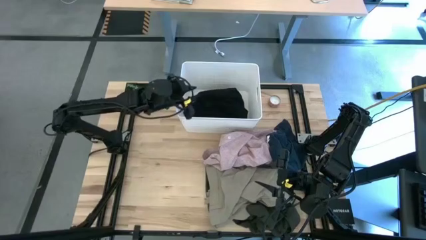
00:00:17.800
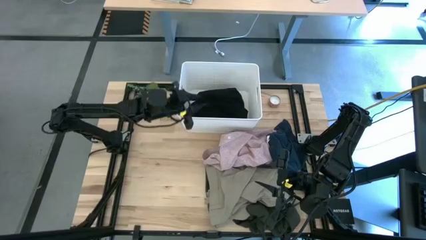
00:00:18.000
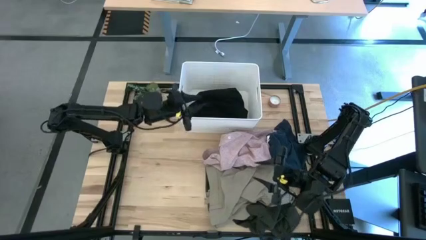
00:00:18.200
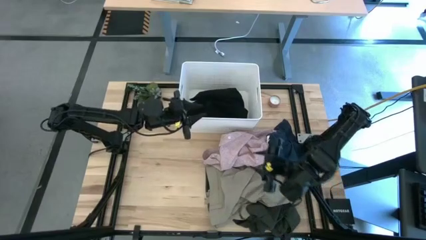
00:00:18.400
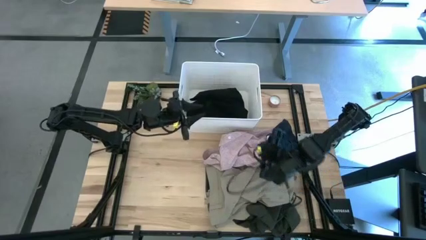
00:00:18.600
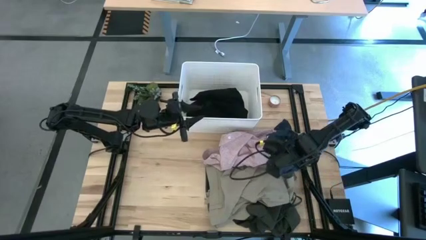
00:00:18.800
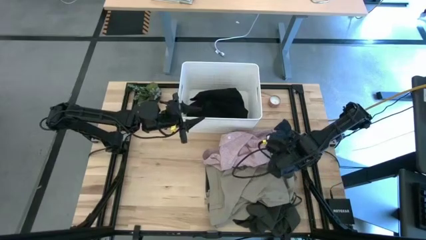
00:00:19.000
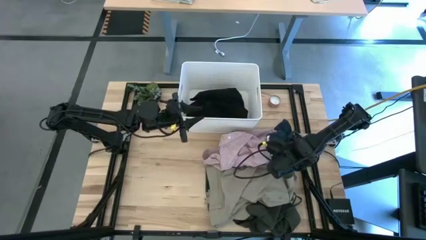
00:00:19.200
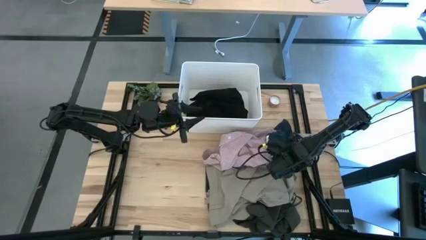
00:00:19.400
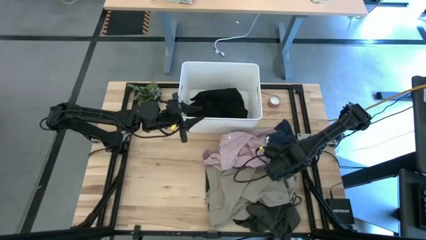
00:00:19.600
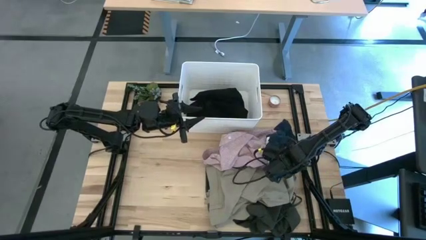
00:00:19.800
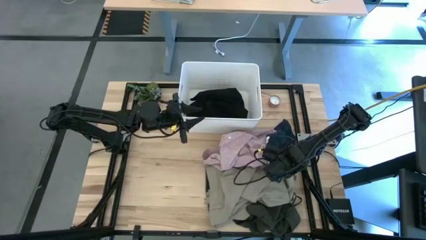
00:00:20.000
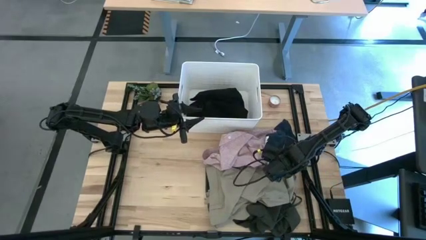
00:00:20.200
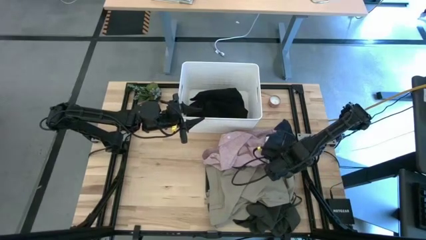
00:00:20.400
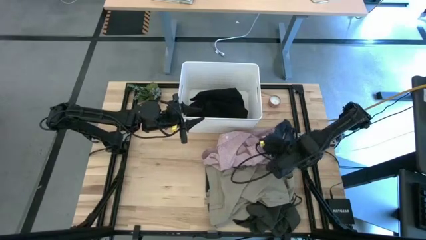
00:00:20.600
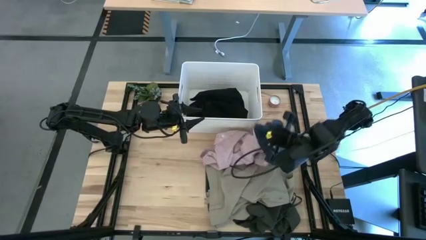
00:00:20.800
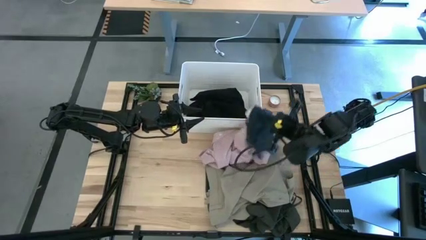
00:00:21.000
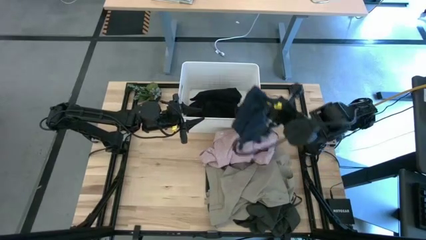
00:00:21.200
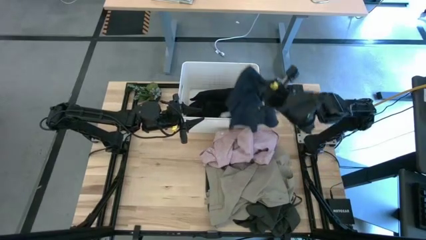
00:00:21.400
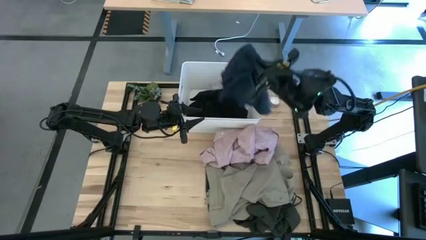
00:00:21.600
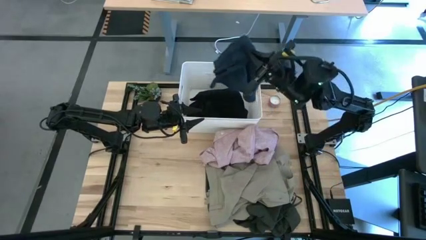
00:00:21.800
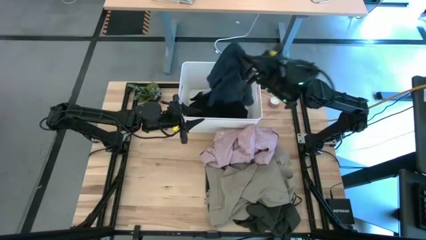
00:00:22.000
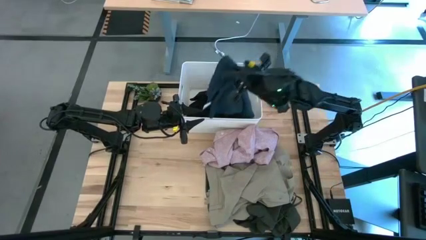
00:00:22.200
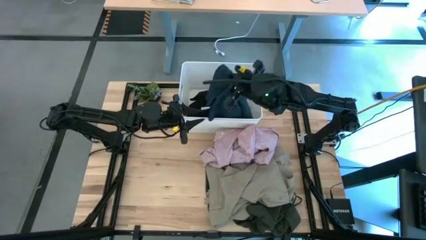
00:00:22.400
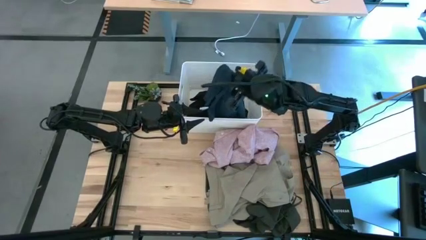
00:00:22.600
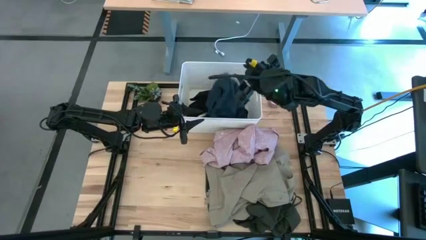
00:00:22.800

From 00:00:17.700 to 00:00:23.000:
Task: Sort clothes
Put the blue underwear in the white bin

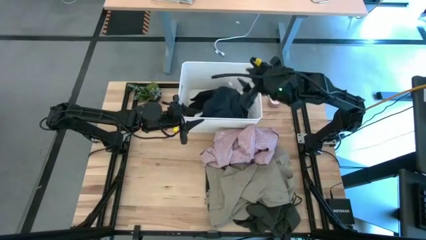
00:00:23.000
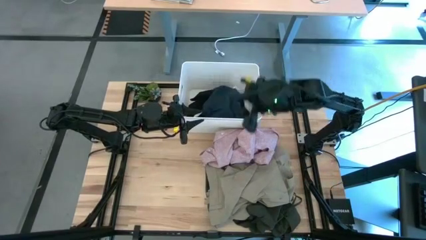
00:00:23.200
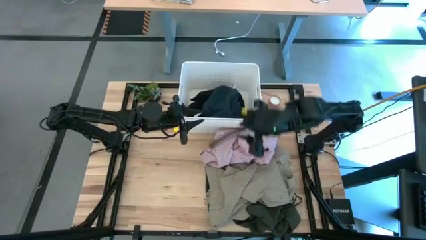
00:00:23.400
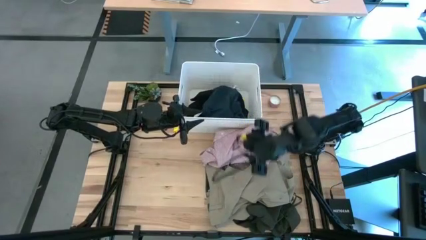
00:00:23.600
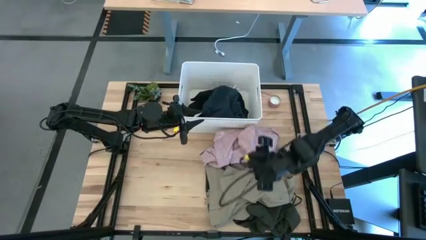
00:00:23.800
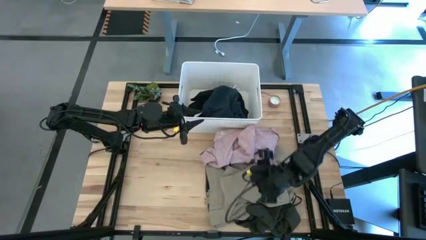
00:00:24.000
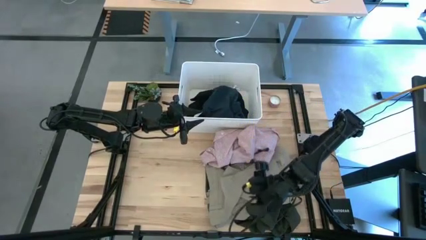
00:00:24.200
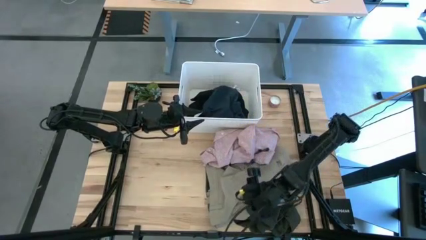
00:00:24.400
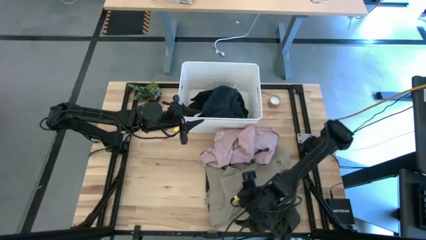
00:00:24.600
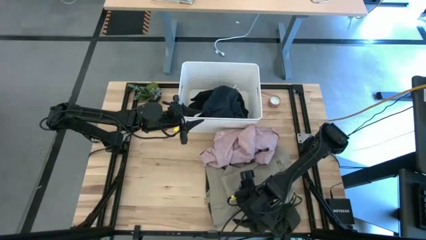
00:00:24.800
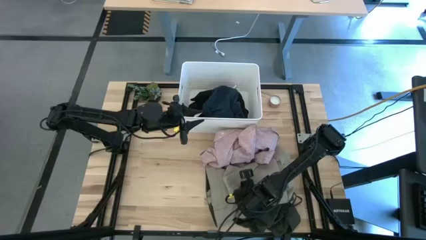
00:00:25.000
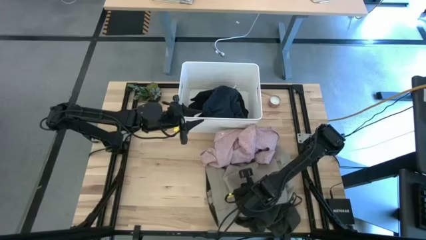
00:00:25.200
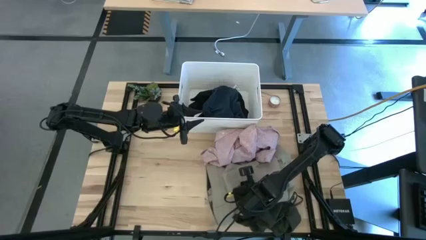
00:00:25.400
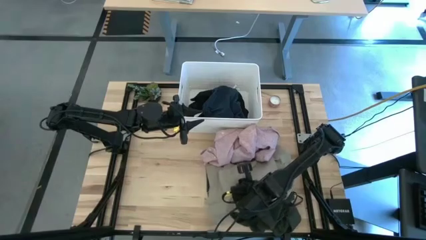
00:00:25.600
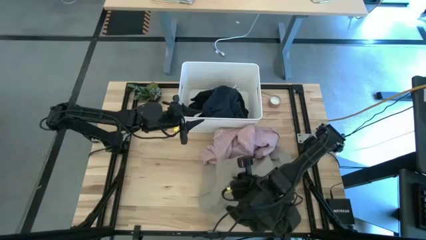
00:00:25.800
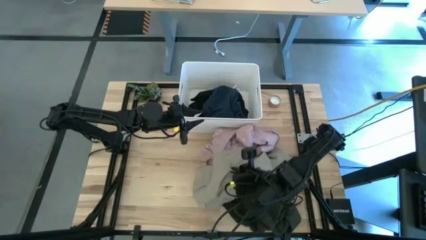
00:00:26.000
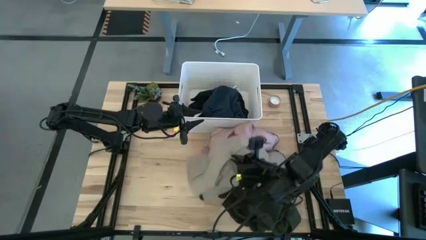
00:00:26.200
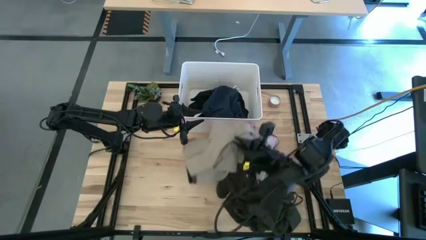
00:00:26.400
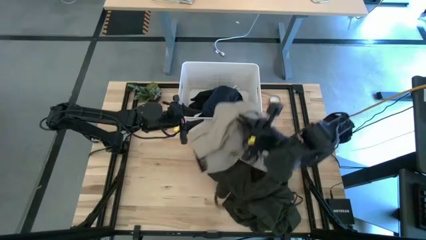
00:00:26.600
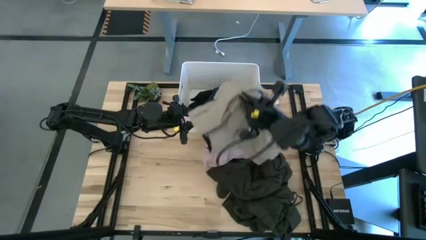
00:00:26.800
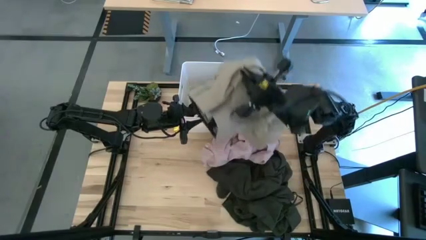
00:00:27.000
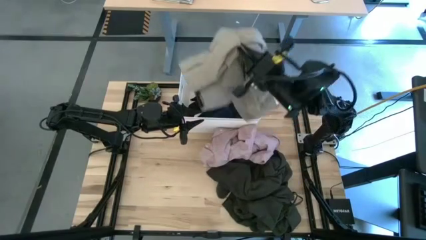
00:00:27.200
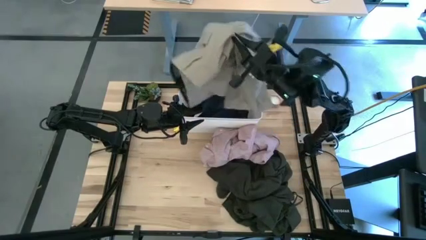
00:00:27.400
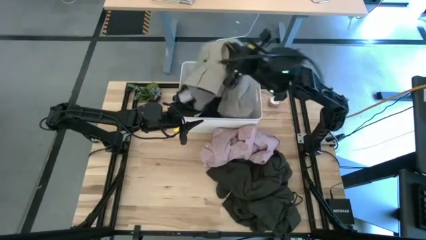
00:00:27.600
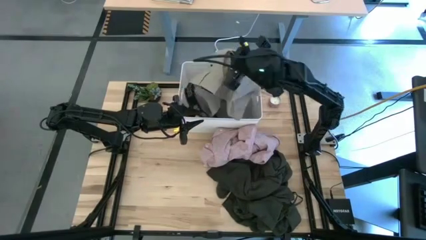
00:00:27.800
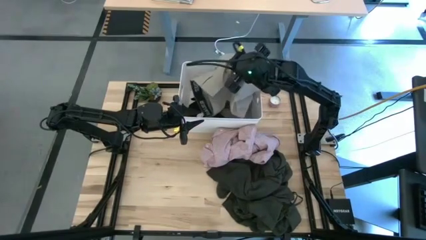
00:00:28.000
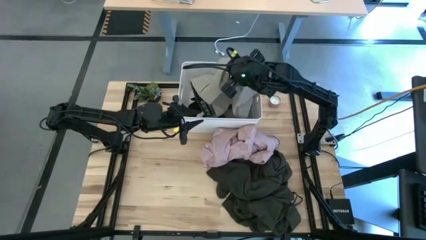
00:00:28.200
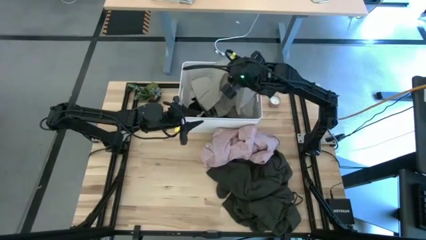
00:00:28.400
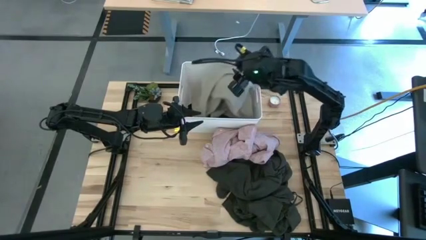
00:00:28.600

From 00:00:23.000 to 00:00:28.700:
Put the brown shorts in the white bin

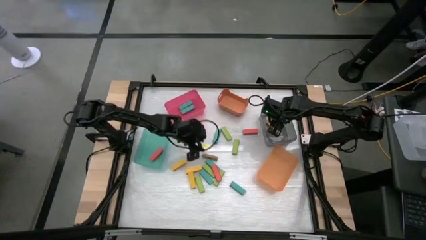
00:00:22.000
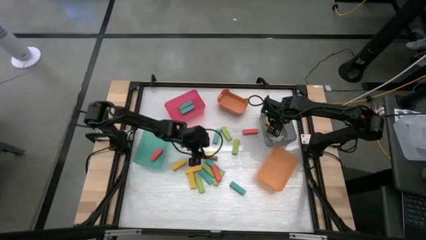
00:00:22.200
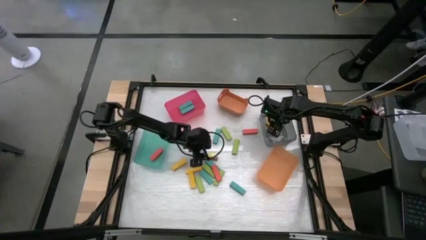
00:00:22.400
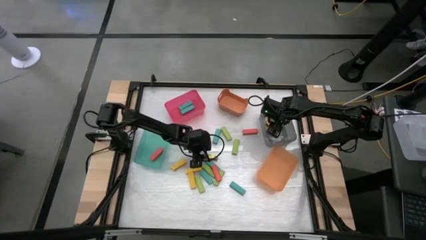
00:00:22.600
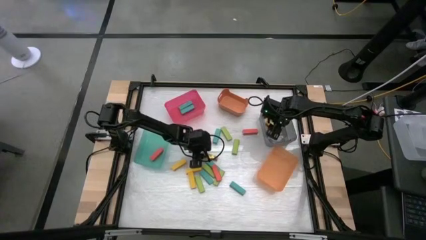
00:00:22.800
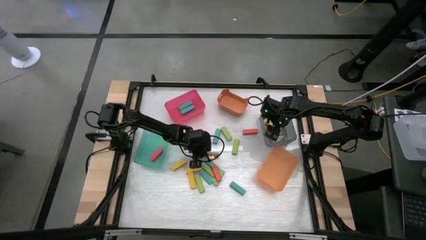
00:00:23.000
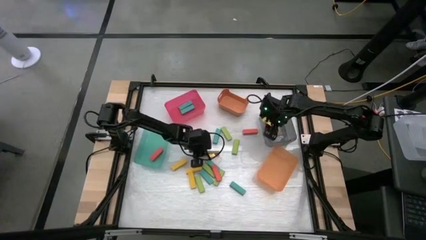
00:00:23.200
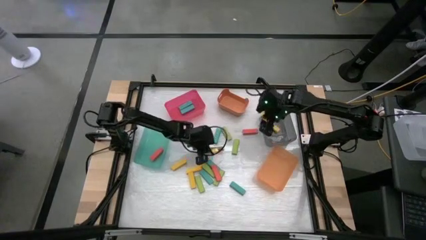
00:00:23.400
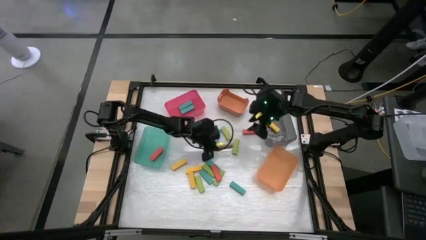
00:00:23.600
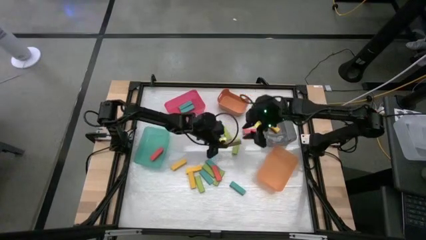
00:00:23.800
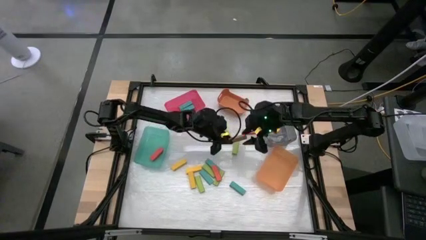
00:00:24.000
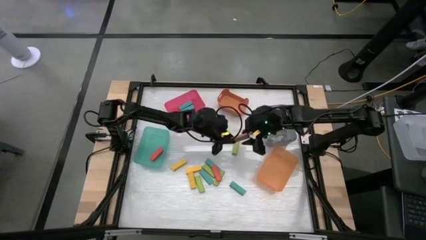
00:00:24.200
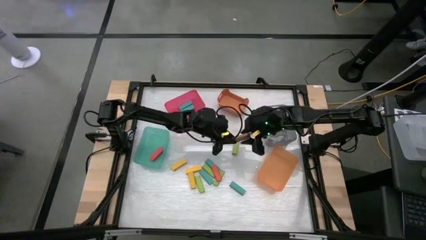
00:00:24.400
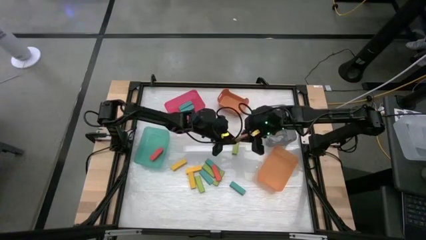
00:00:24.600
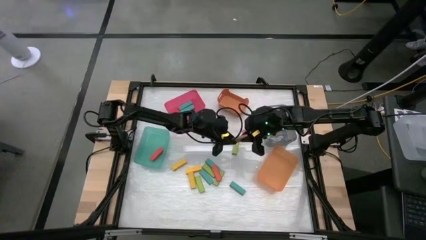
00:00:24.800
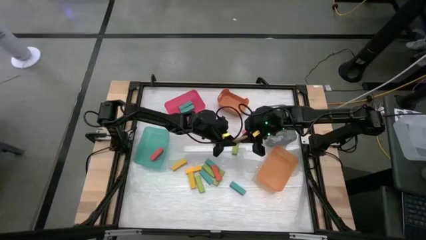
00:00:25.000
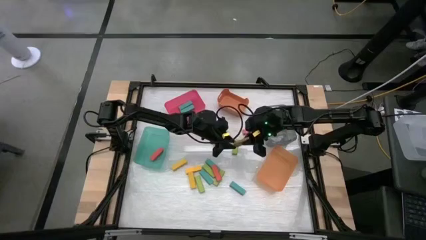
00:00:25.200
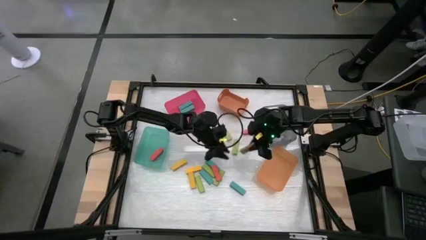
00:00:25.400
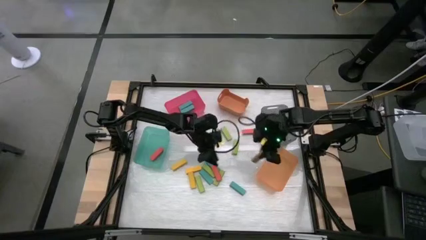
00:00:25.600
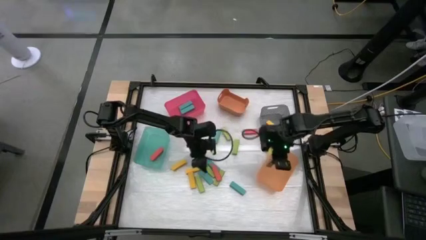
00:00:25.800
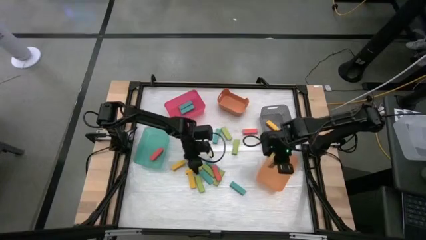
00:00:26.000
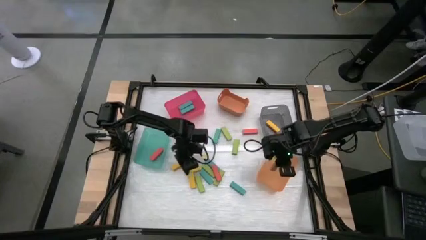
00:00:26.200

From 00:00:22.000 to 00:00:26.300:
Task: Sort blocks
Put the brown block into the light orange bin

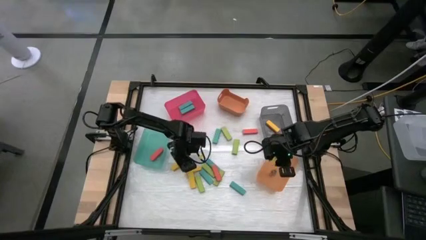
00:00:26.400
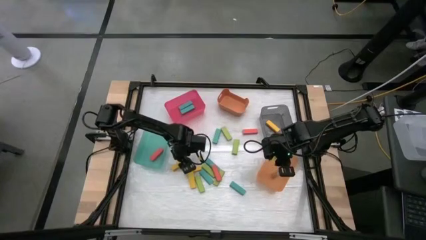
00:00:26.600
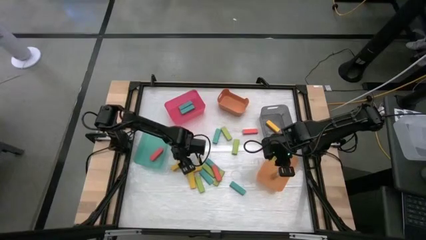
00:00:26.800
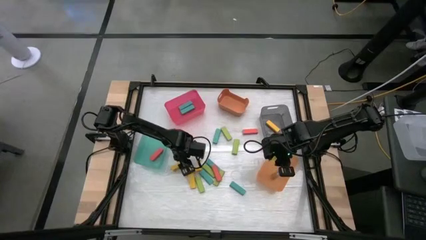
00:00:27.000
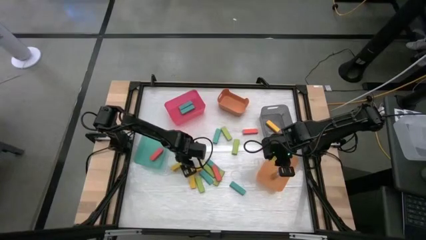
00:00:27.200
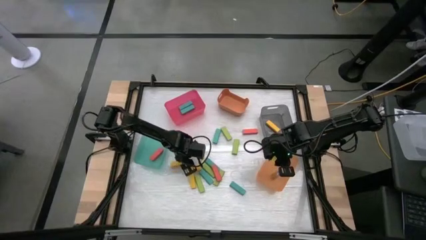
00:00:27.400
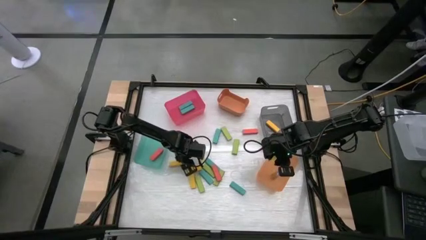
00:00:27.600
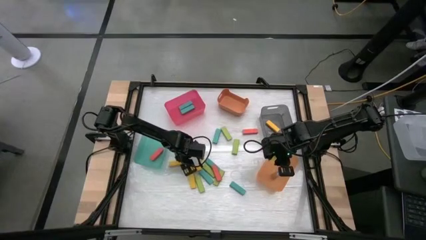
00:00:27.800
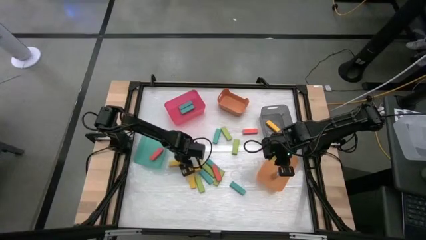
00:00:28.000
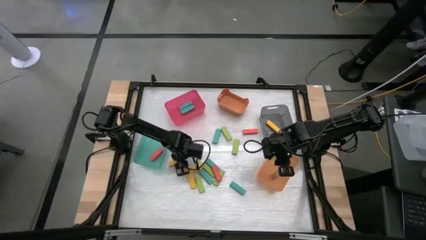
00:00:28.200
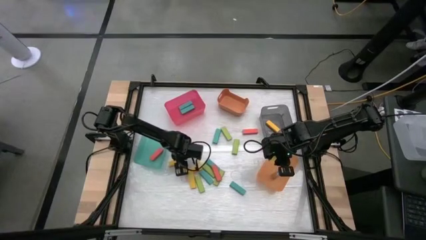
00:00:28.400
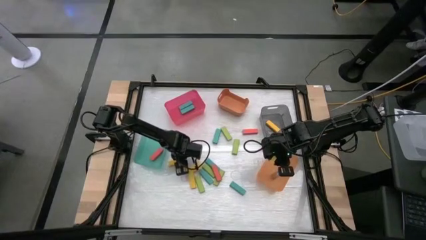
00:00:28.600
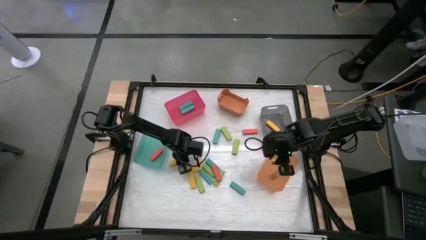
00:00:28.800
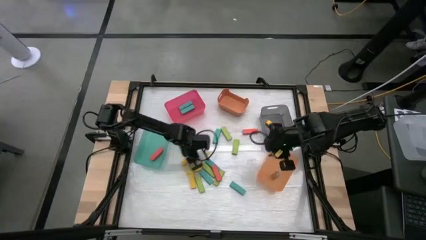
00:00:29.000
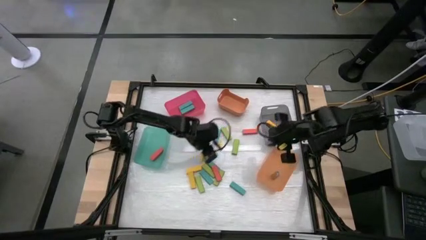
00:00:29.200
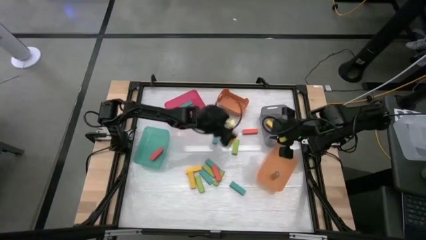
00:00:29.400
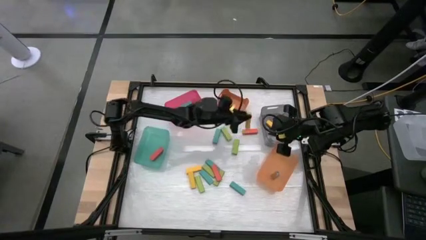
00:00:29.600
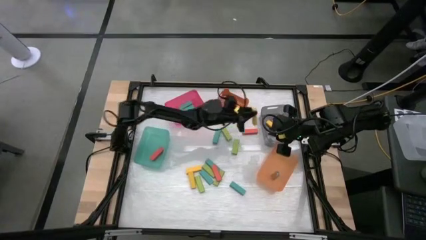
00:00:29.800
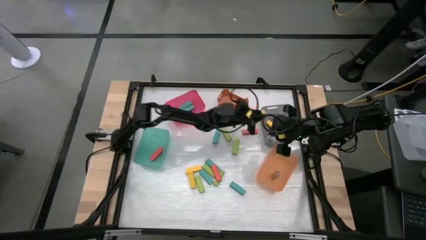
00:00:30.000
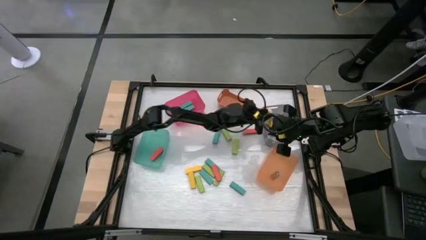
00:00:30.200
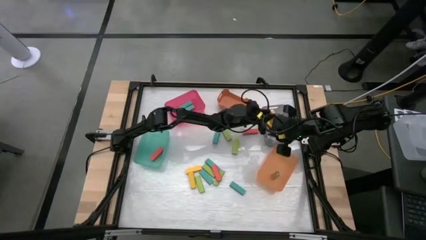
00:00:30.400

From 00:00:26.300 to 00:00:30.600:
Put the yellow block into the gray bin
